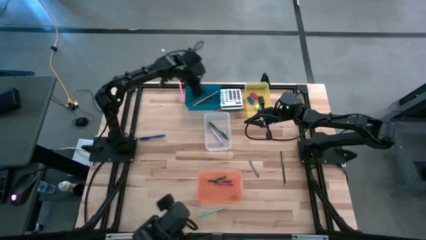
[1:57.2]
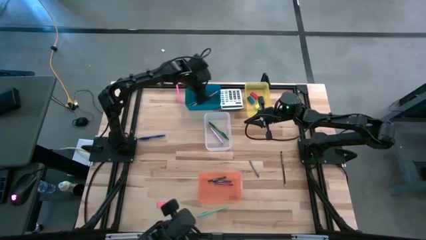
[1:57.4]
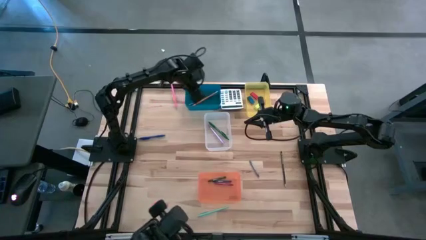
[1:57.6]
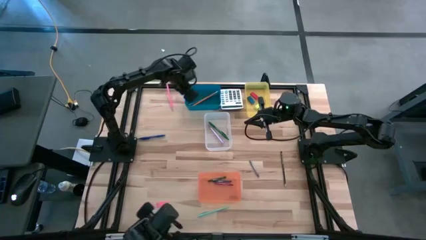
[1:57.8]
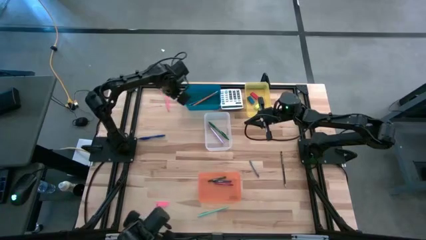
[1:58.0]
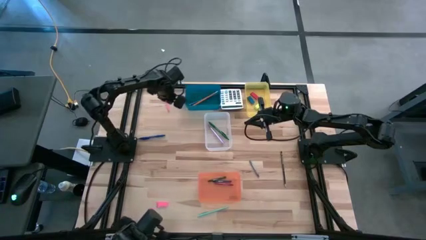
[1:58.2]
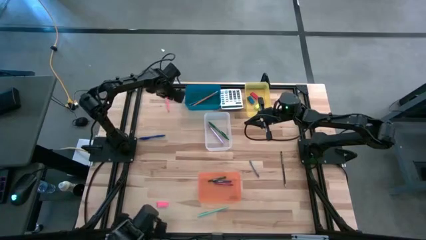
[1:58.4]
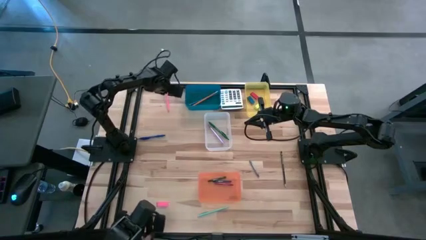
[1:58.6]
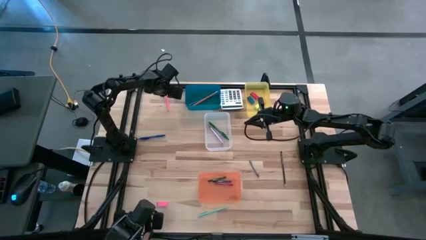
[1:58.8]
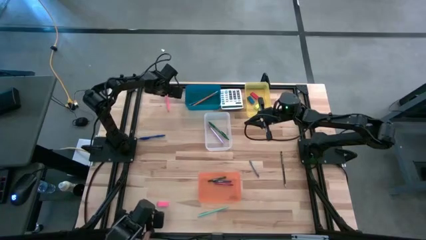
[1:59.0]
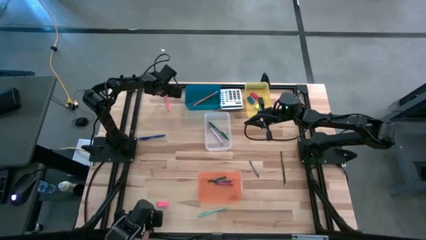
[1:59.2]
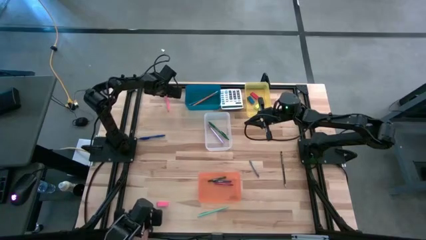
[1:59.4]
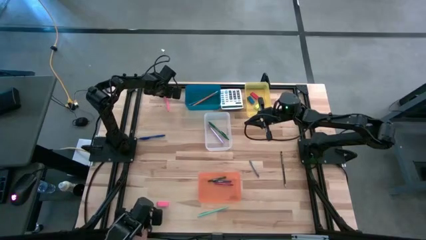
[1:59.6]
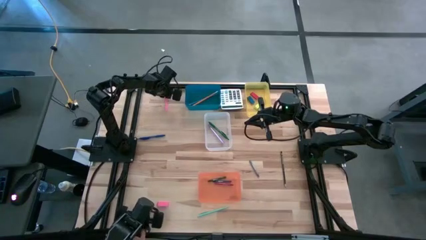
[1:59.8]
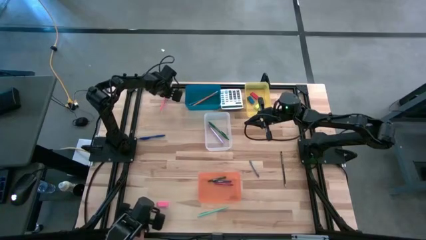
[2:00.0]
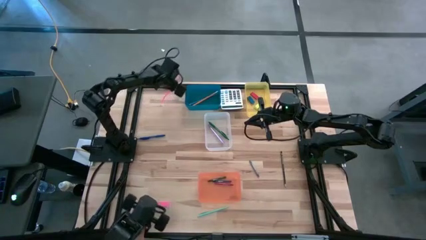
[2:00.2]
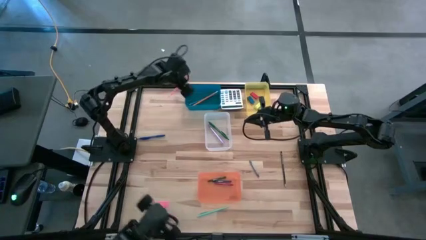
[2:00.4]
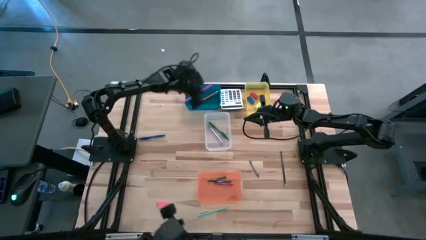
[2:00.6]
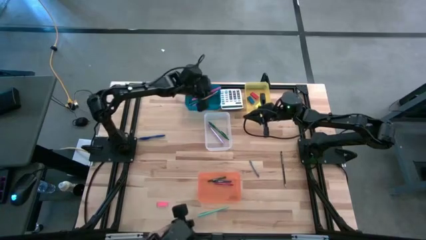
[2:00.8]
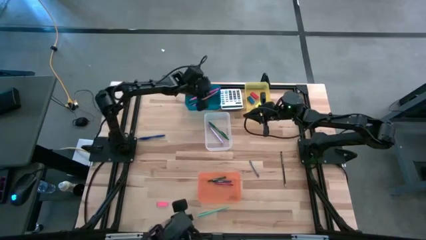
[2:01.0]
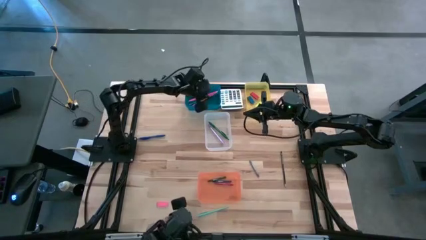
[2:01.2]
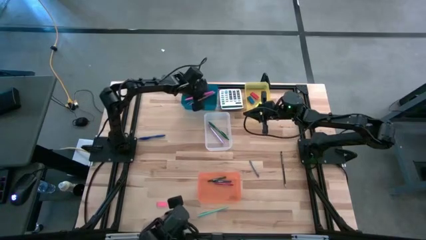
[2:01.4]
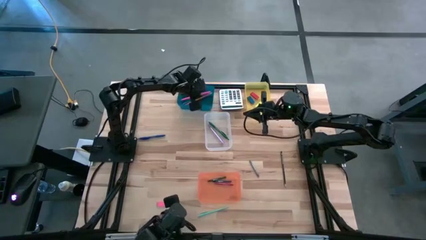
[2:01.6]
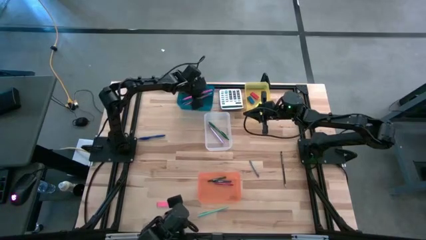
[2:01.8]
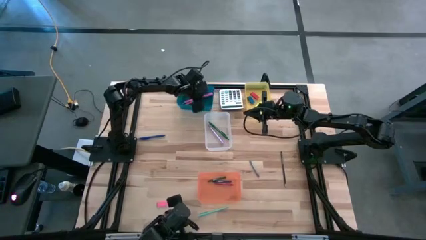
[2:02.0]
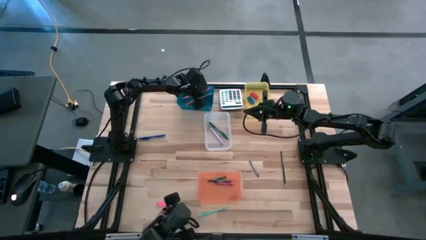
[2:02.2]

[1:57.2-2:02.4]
Task: Sort crayons/erasers/pens/pencils in bins
Put the pink pencil into the blue bin

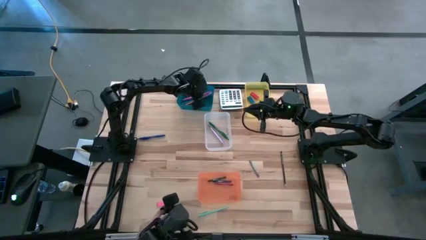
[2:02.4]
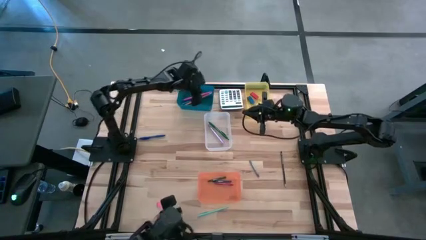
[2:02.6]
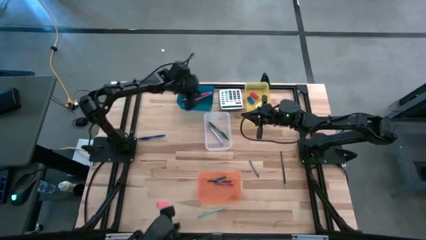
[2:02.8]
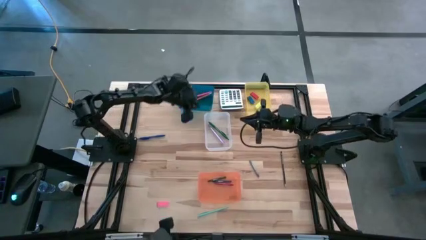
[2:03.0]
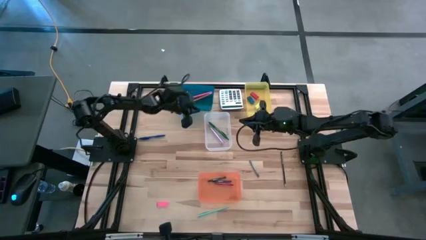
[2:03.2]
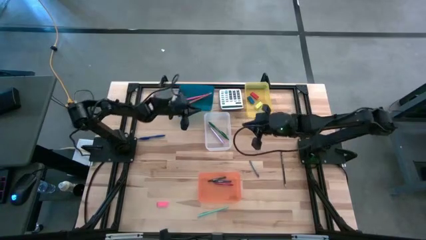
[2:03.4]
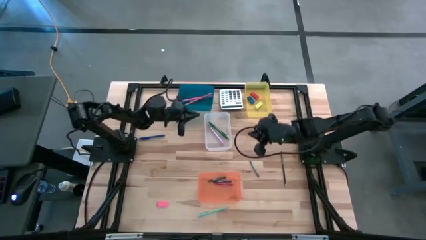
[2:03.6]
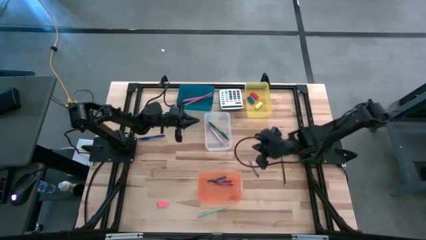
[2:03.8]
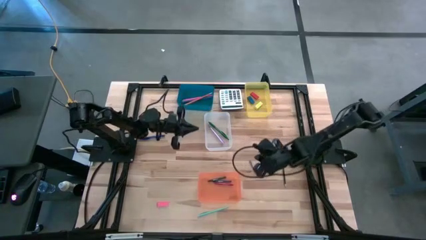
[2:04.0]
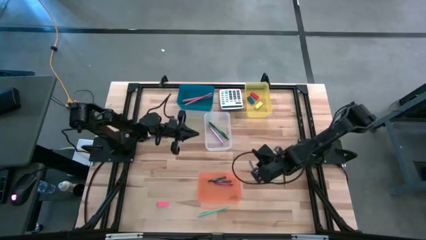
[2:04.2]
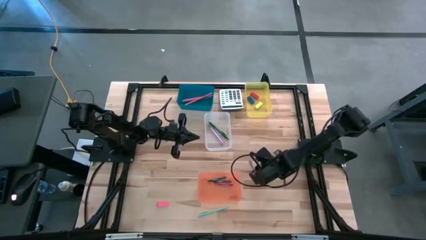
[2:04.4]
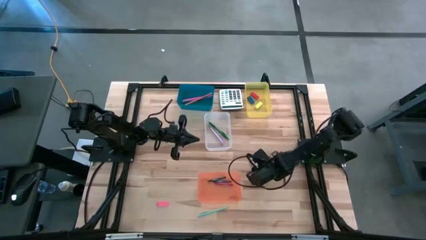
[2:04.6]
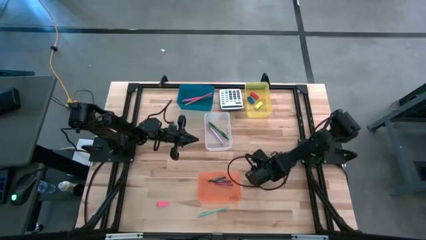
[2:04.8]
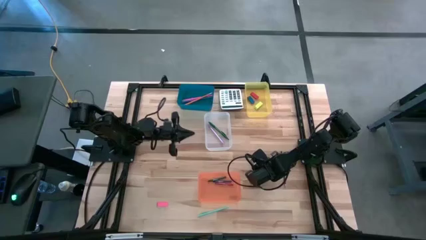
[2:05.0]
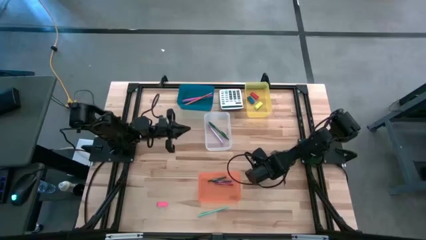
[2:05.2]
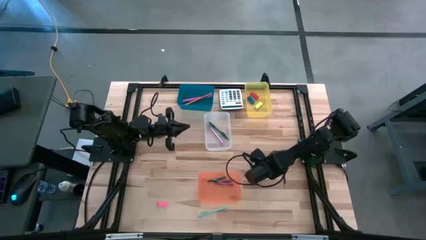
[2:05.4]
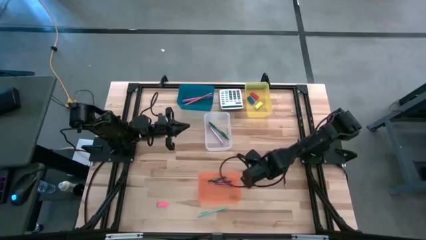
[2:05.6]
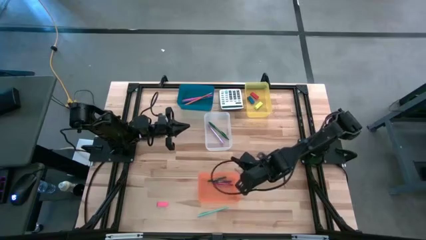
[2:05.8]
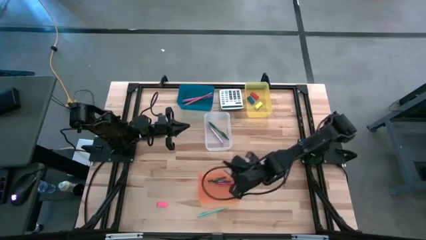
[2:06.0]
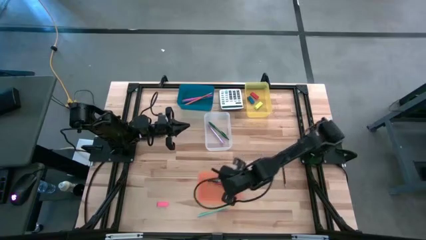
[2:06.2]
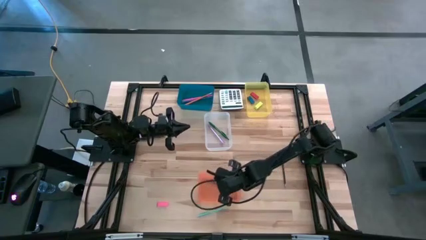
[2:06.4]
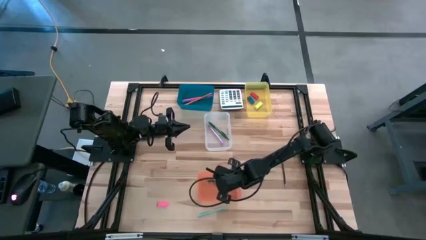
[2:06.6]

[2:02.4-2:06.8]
Put the gray crayon into the orange bin

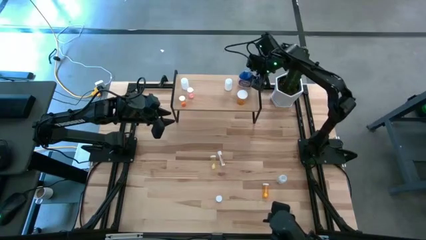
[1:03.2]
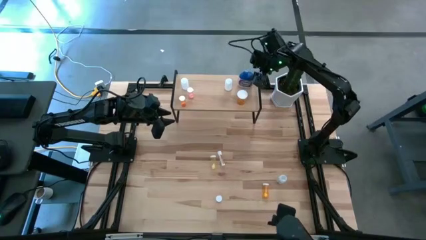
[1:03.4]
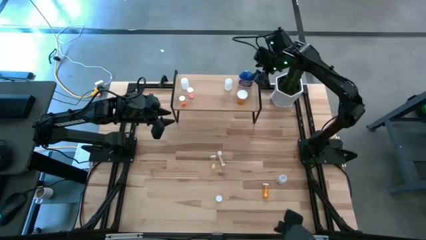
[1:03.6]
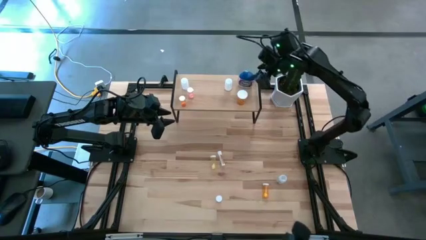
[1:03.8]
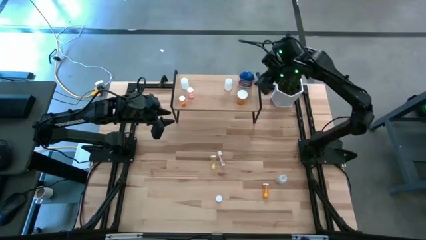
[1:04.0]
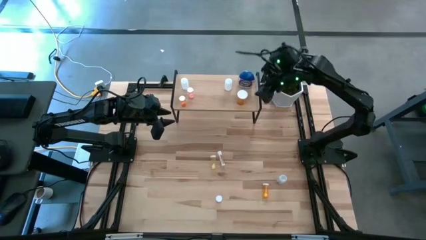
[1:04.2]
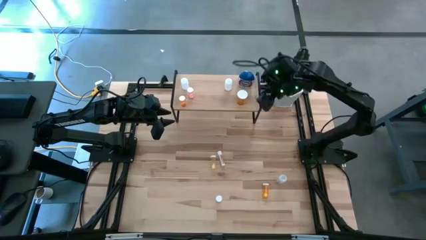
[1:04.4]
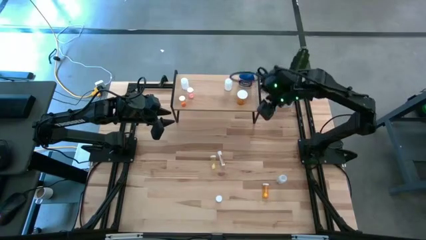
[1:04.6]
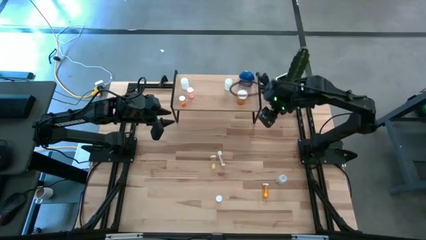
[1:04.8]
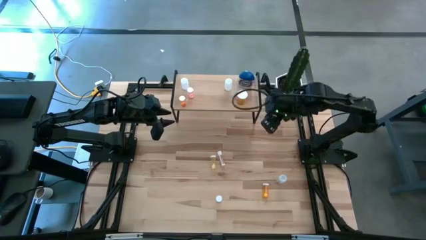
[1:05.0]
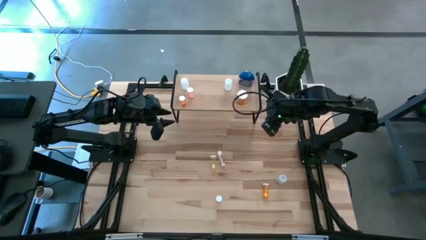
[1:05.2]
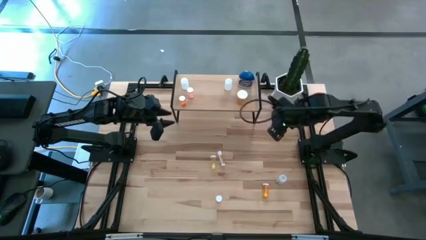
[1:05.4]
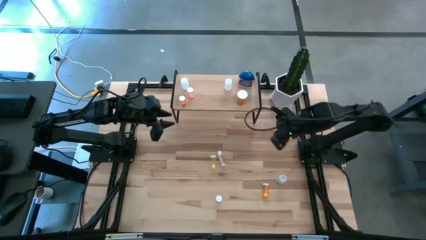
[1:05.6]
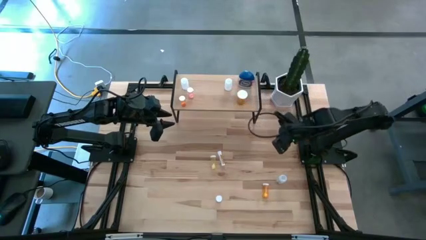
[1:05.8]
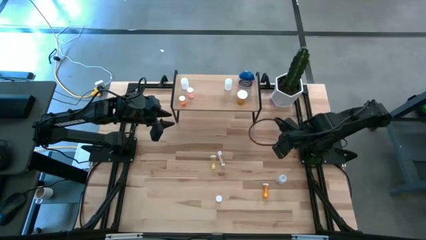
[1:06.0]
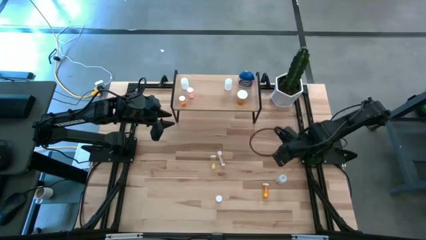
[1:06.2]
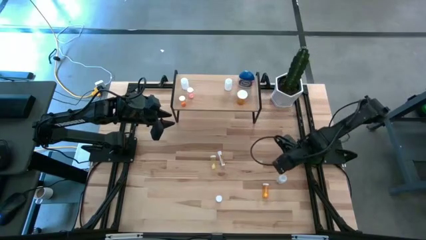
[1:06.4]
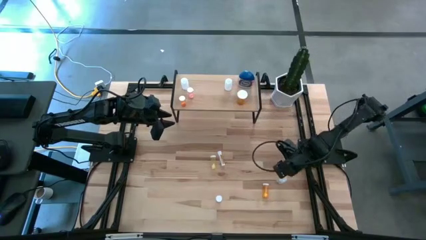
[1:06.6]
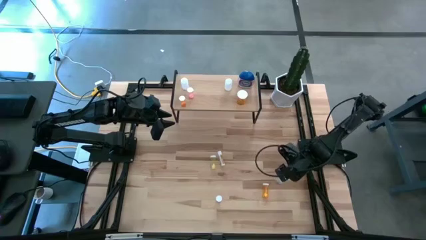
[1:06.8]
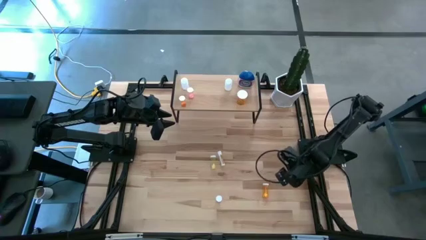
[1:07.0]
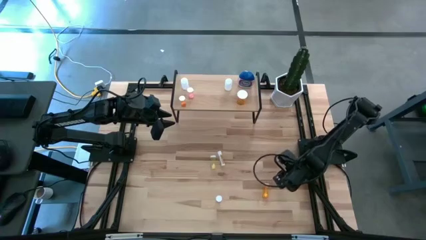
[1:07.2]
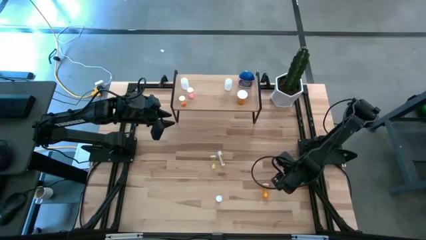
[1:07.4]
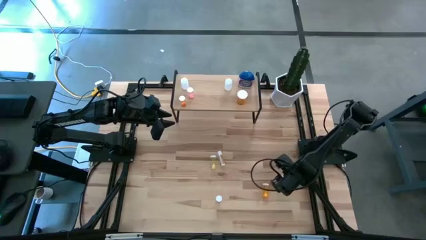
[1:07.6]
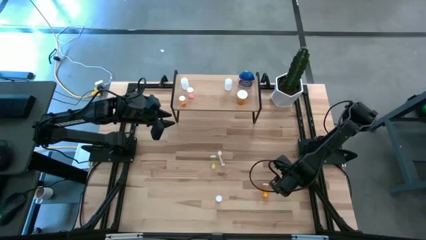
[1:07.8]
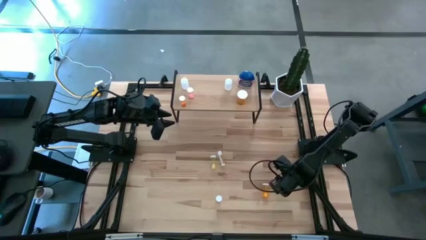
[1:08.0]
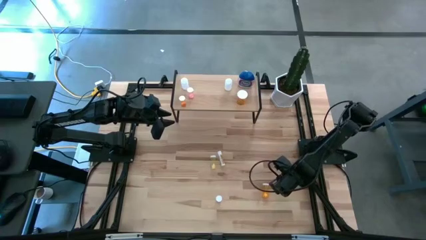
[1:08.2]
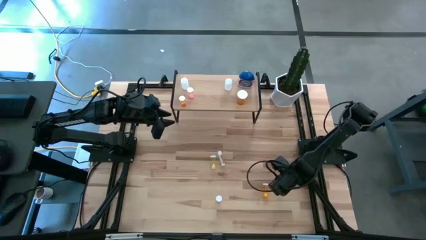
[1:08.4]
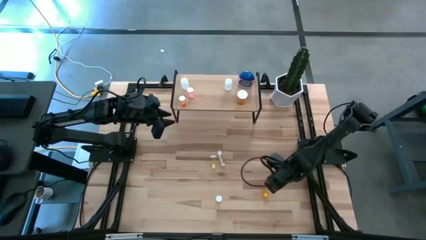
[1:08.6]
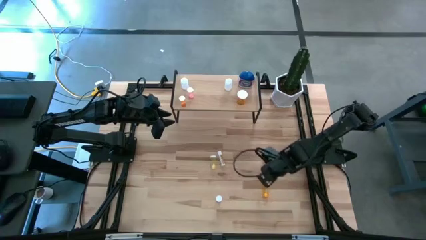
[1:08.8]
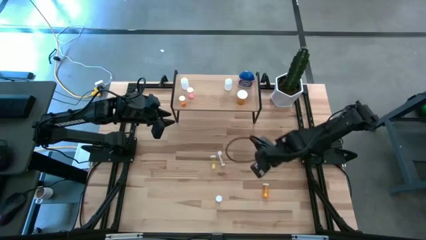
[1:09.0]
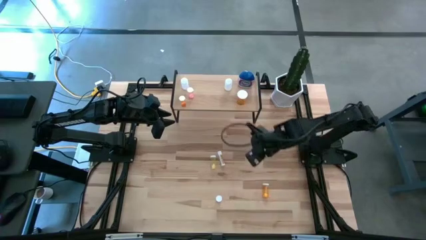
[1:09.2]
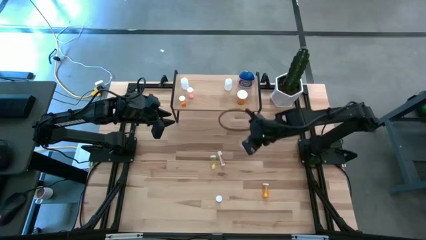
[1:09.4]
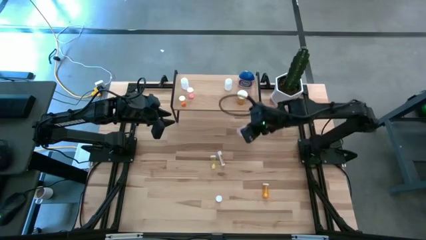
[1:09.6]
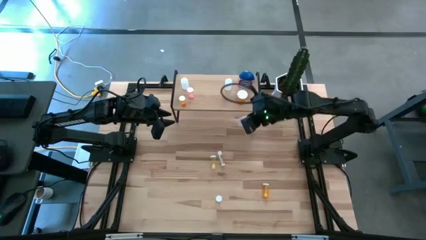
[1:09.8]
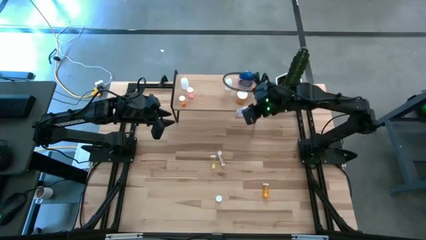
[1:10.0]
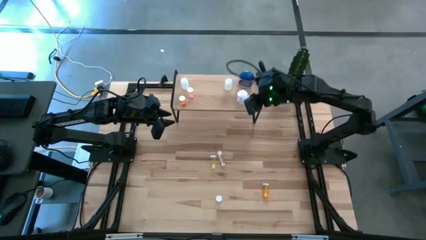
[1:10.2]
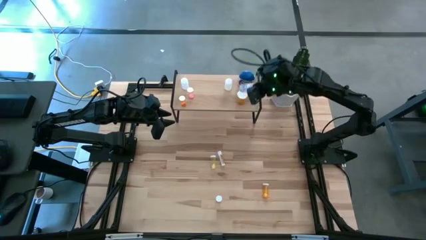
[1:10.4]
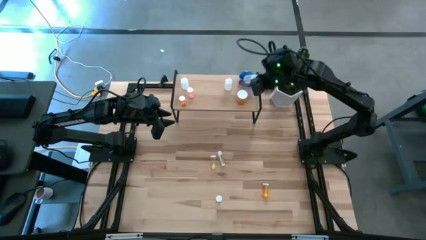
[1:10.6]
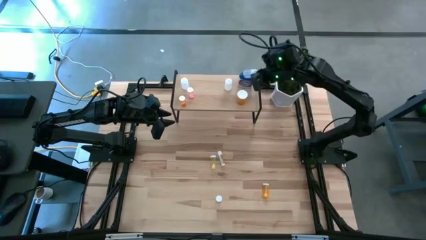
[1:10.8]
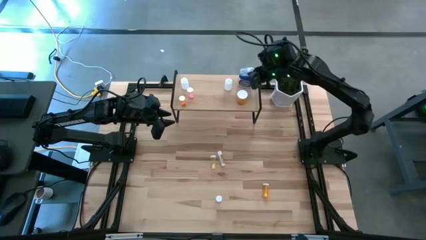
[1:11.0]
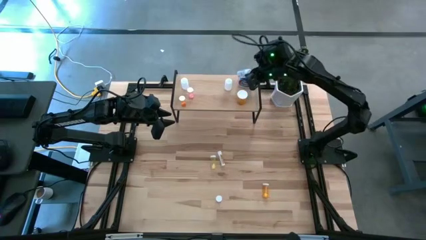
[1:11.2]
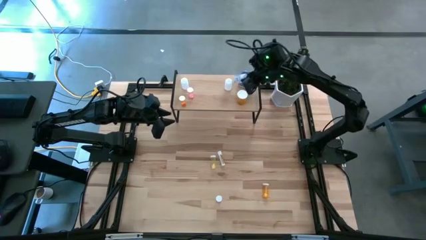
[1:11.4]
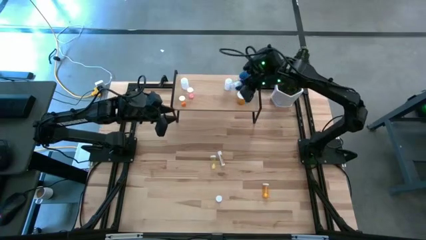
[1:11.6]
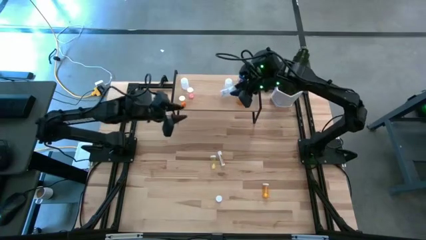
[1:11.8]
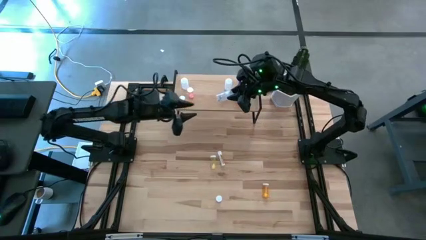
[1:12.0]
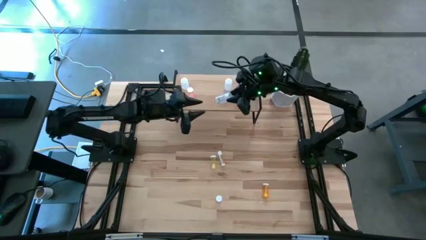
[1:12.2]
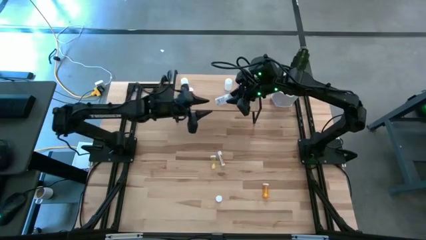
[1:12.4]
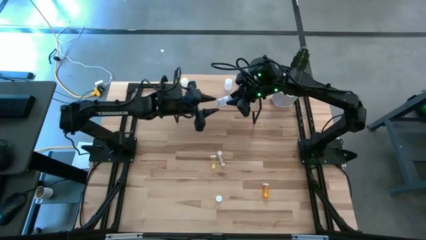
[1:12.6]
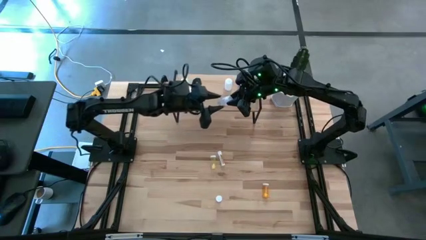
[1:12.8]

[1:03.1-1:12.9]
Task: Pick and place medicine bottles onto shelf by color
Put the transparent pill bottle on the shelf
